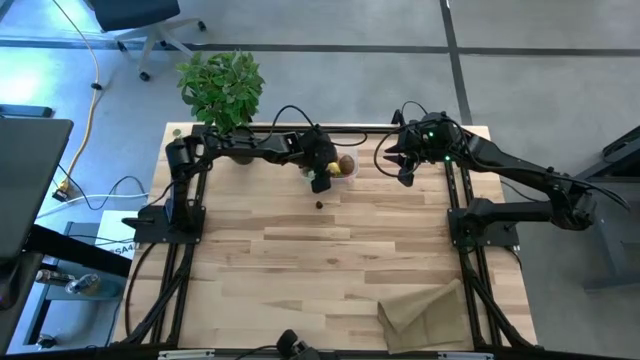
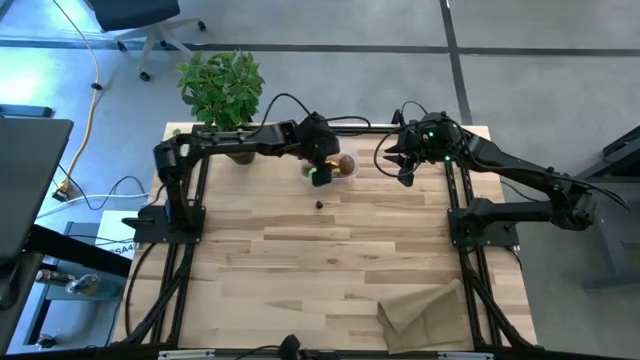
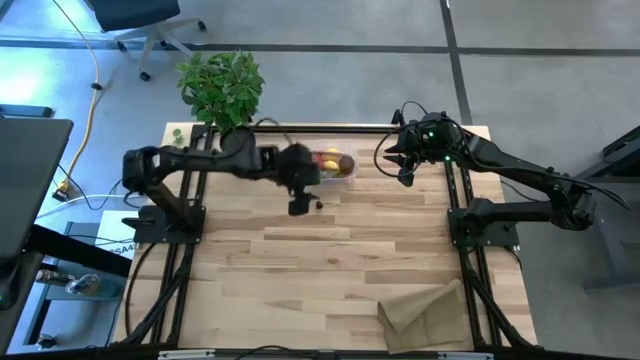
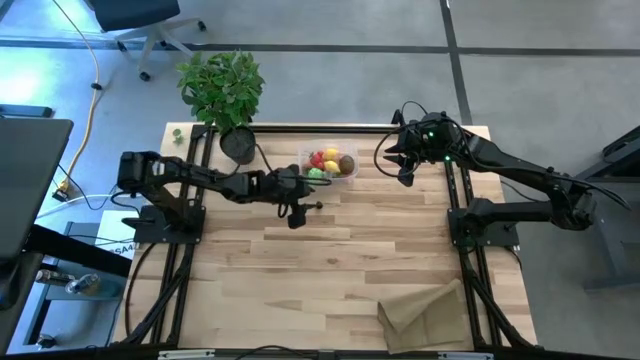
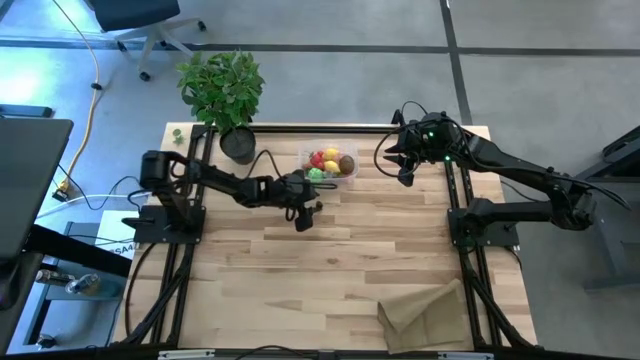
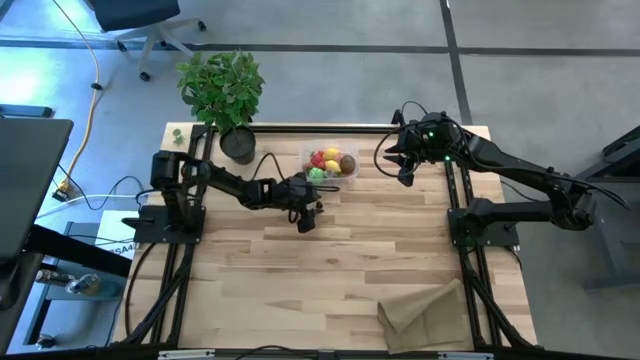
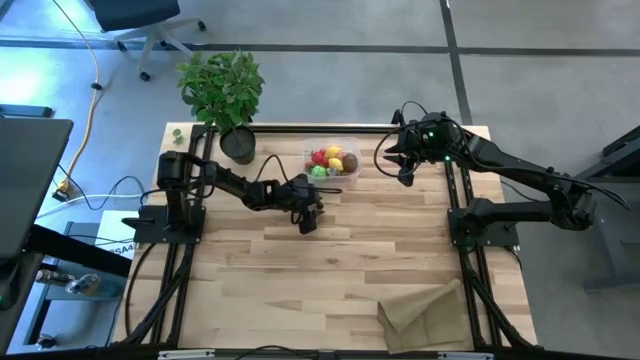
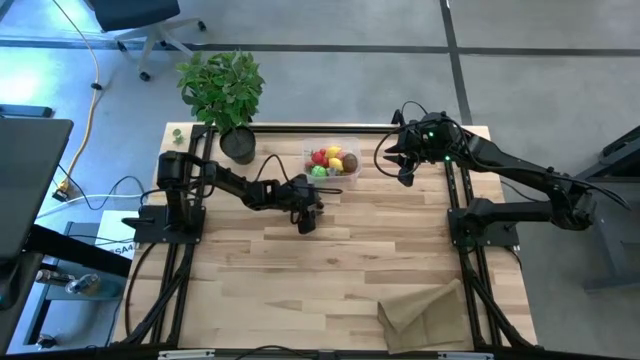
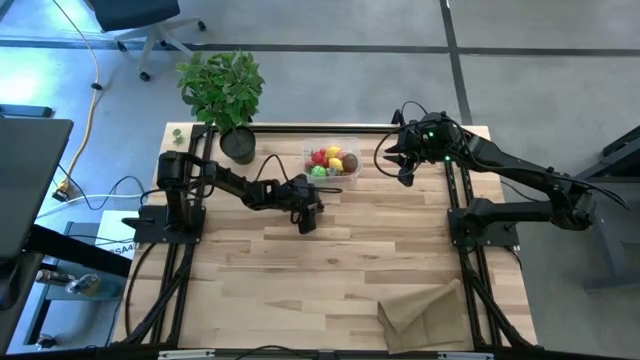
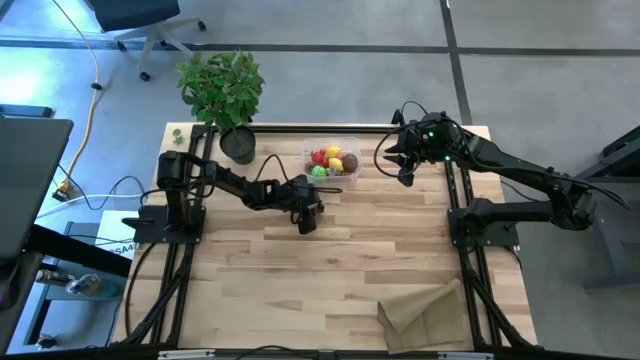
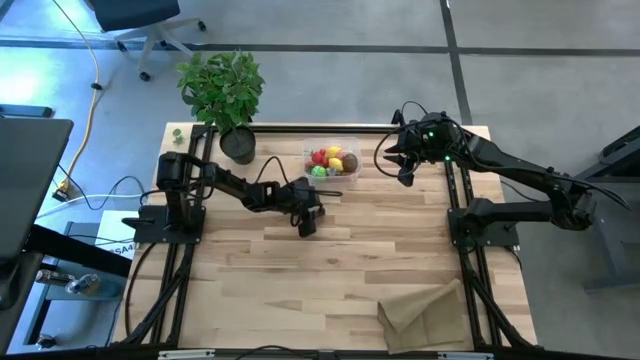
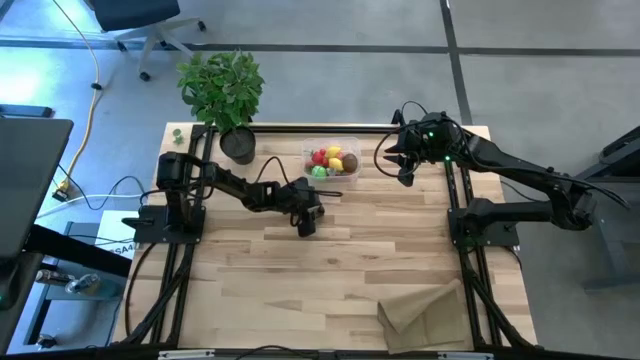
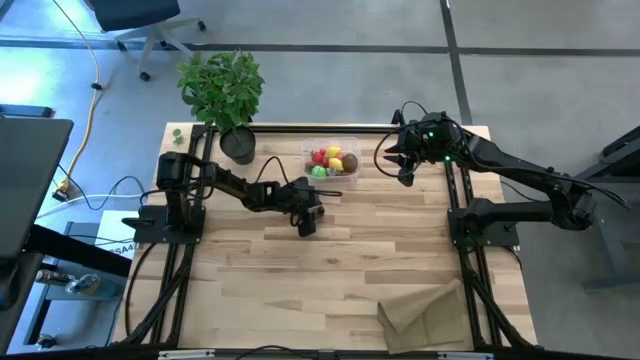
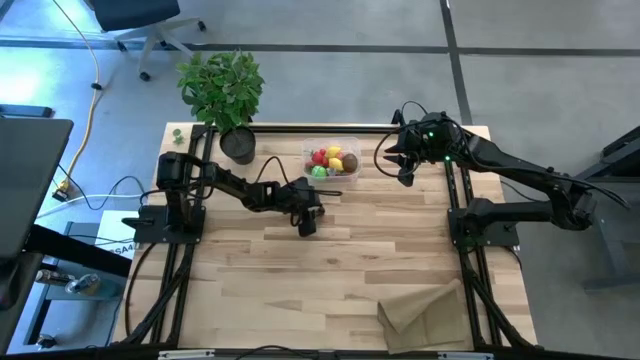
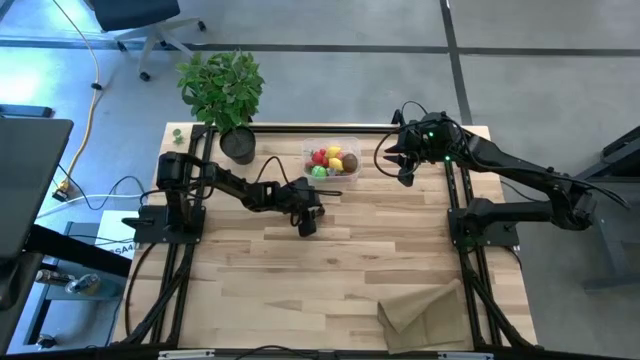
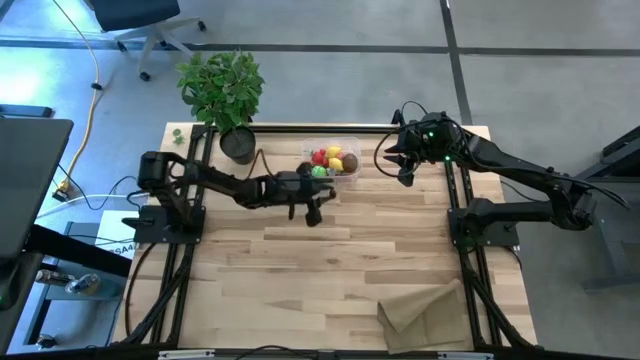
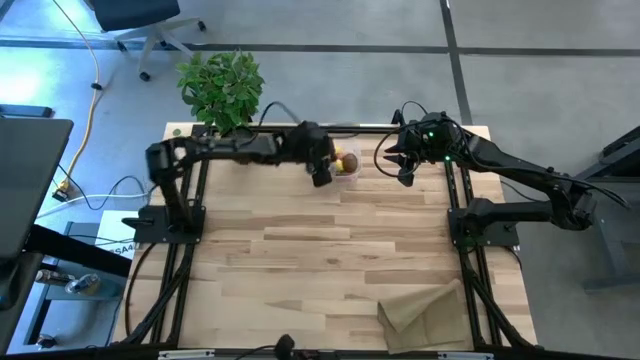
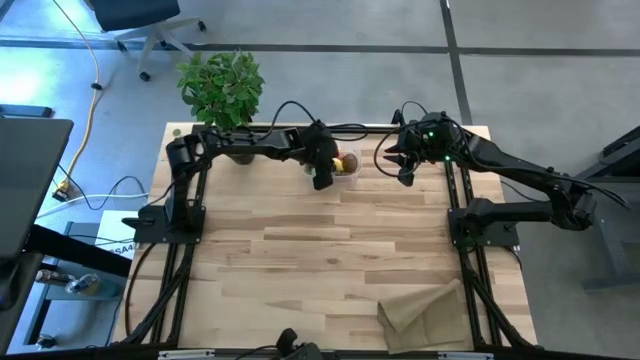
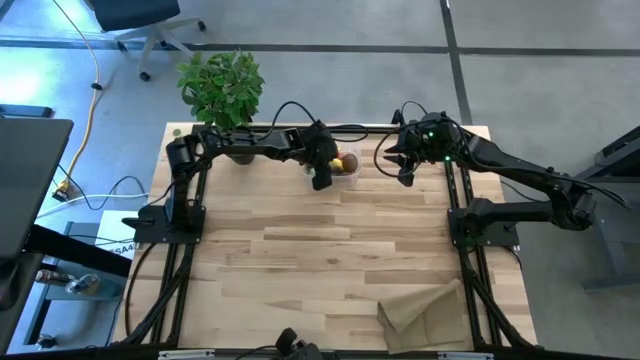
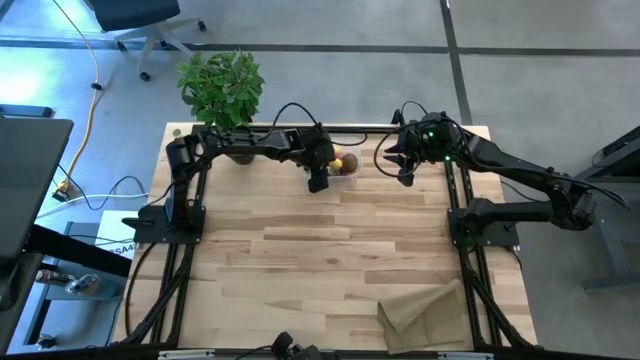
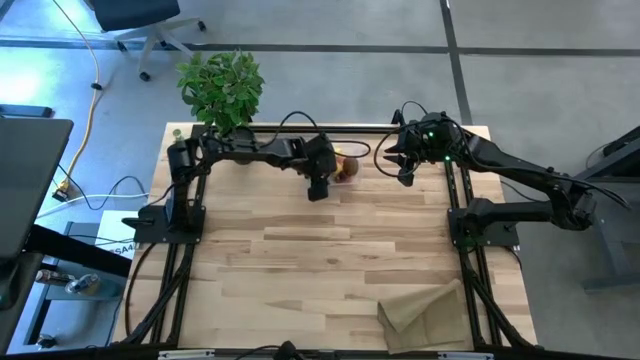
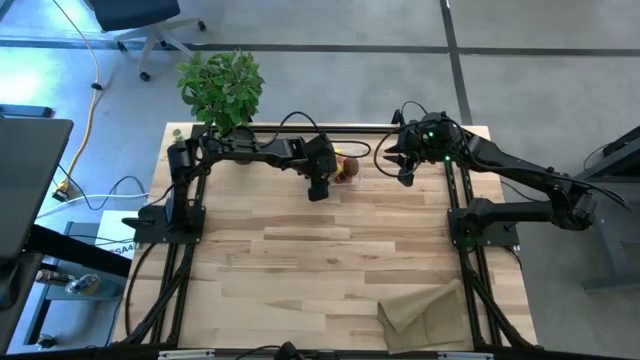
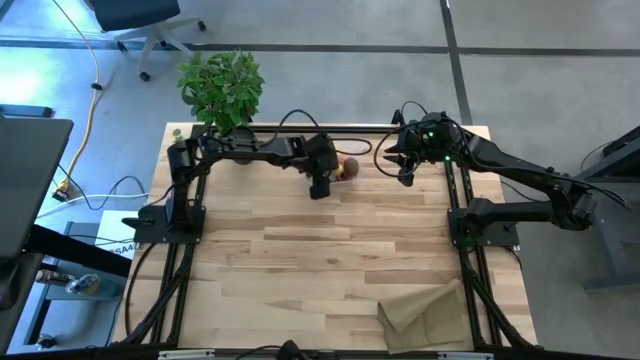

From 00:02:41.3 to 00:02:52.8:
Task: Pick and placing Produce into tupperware
Put the blackberry into the transparent bin

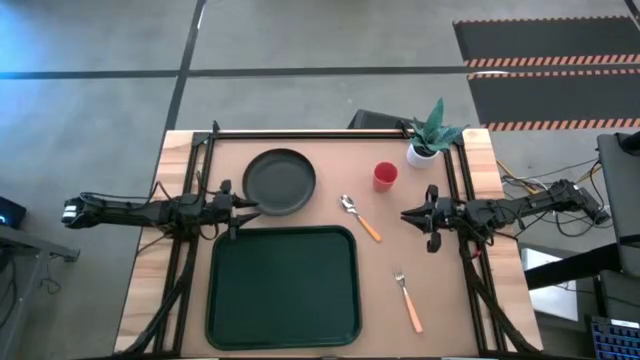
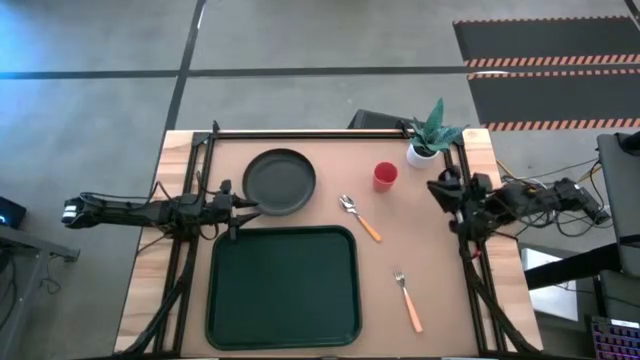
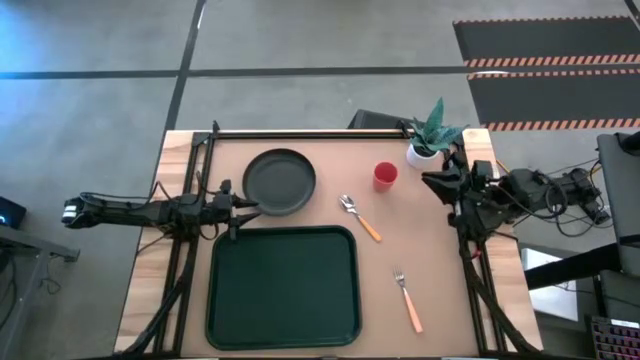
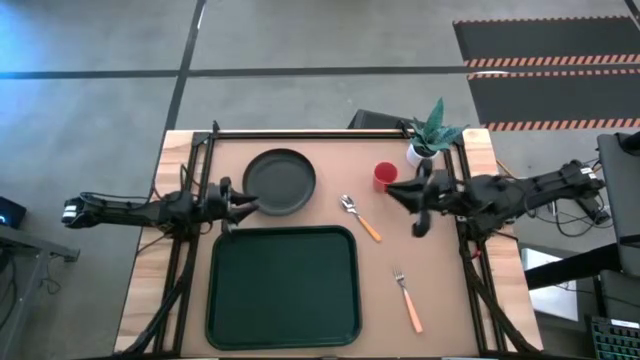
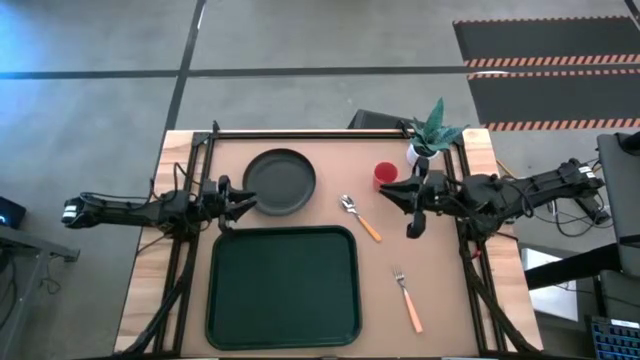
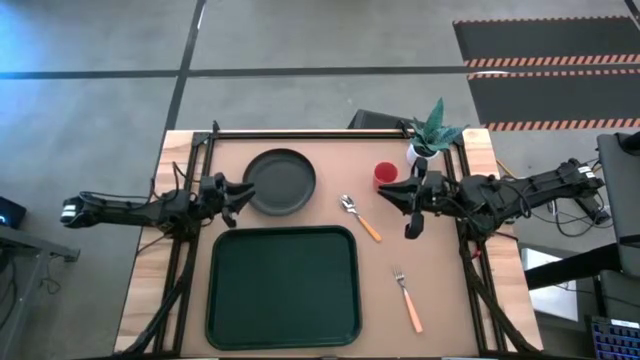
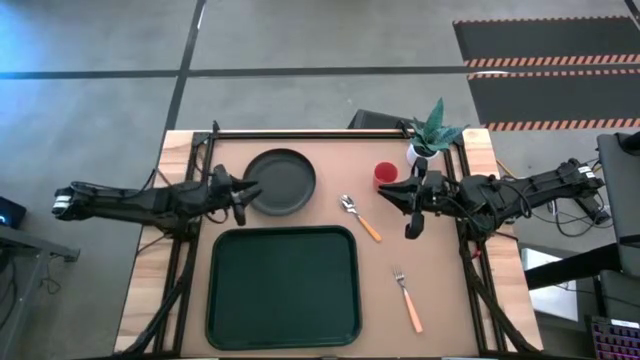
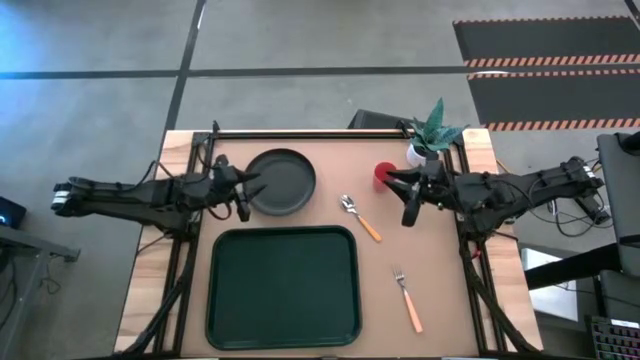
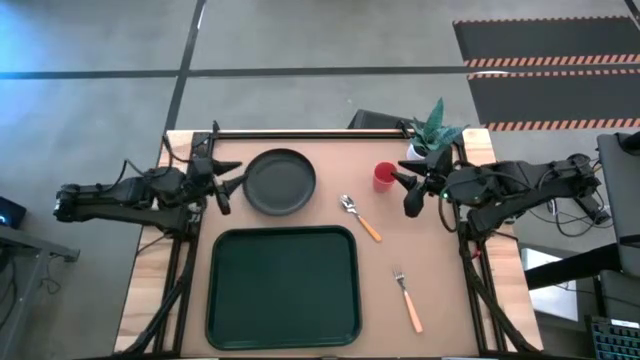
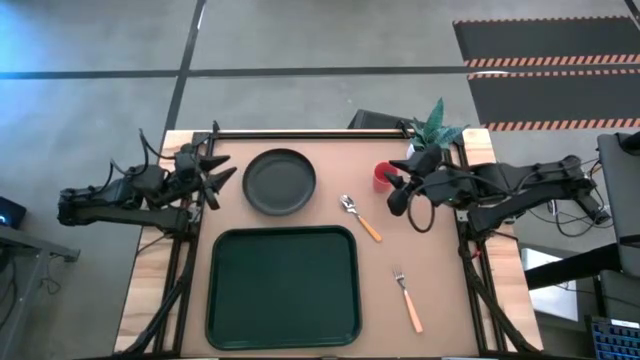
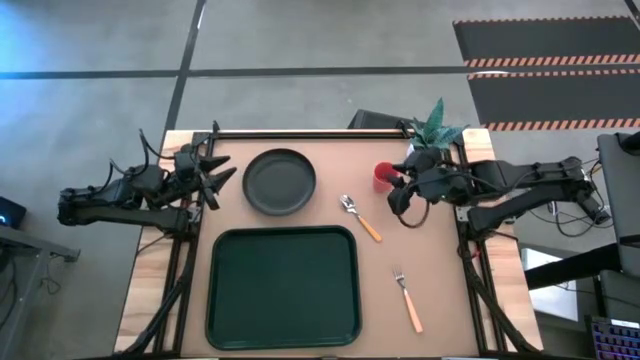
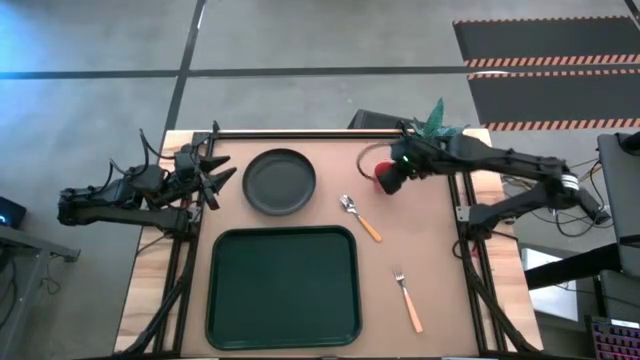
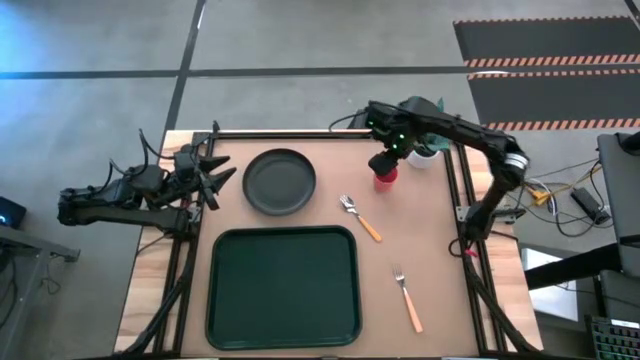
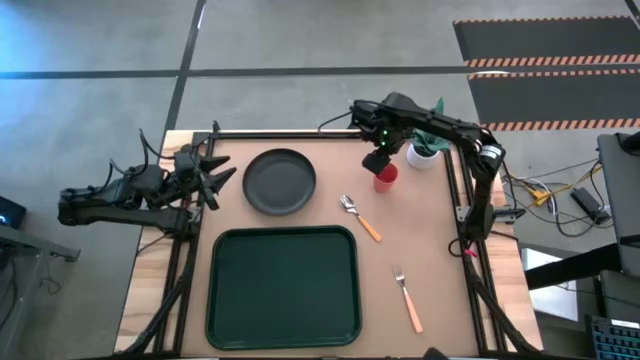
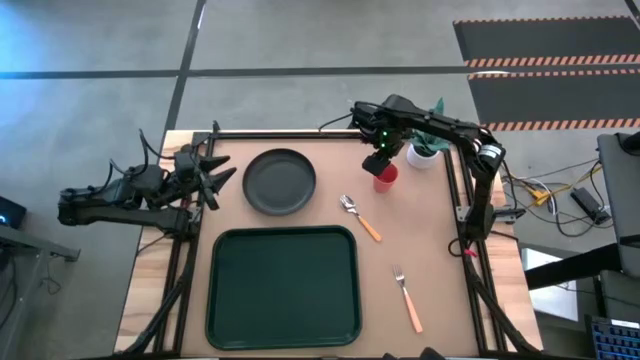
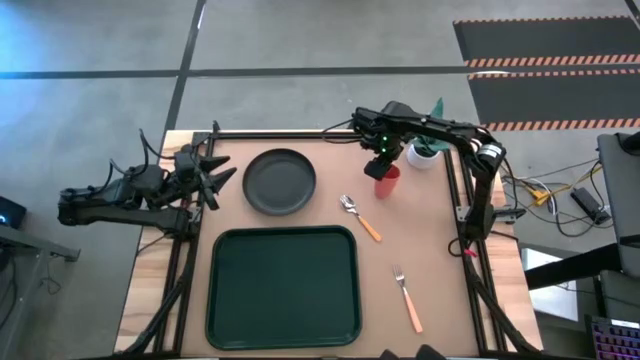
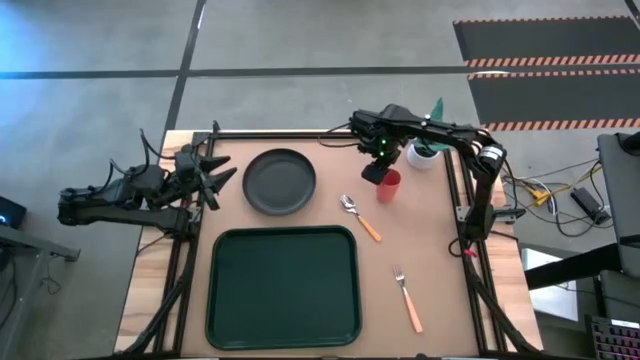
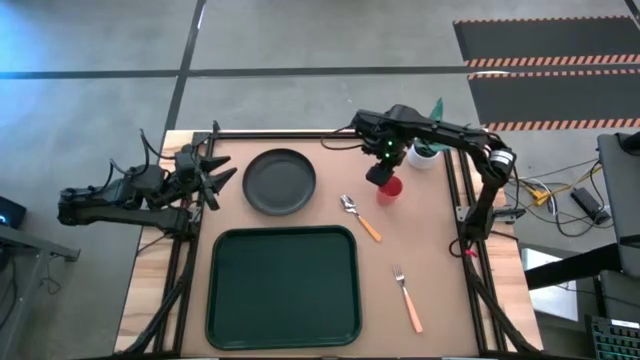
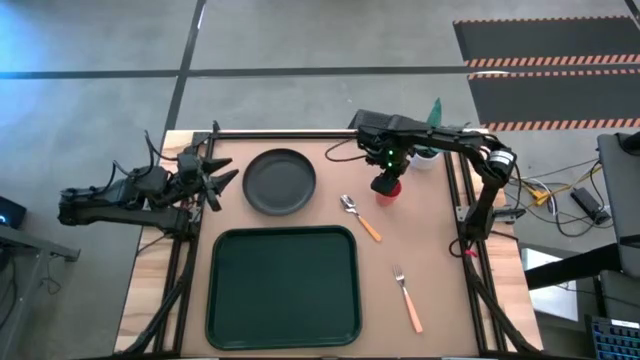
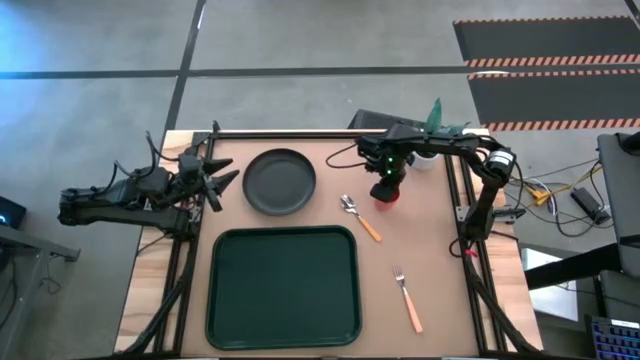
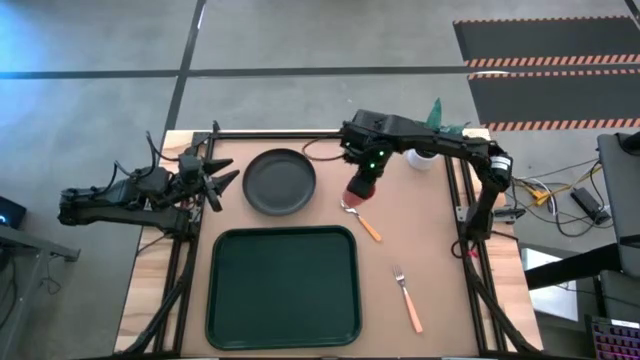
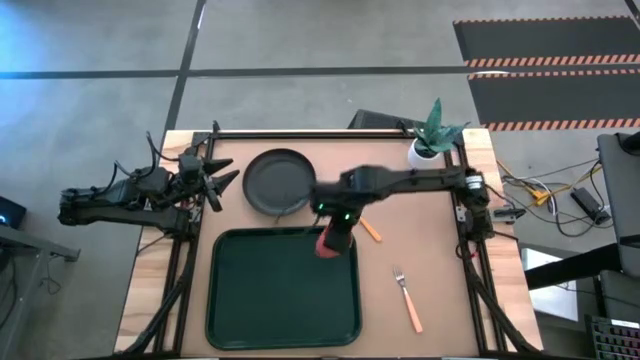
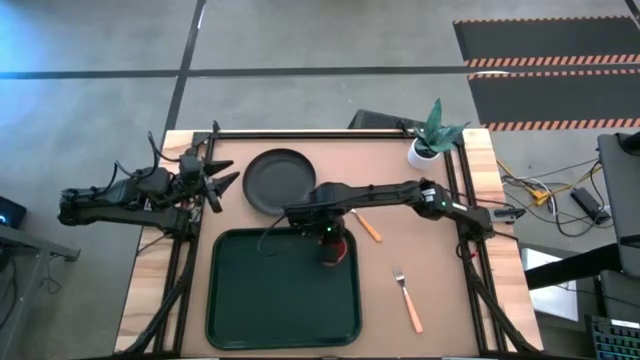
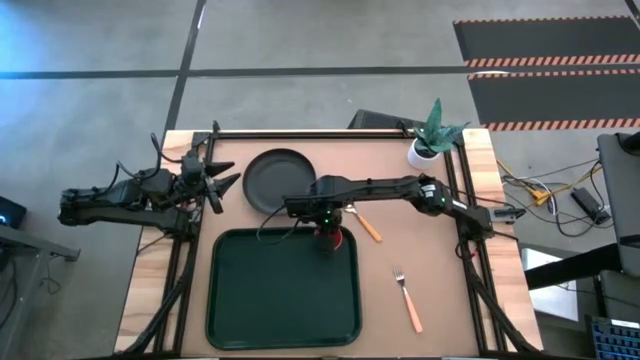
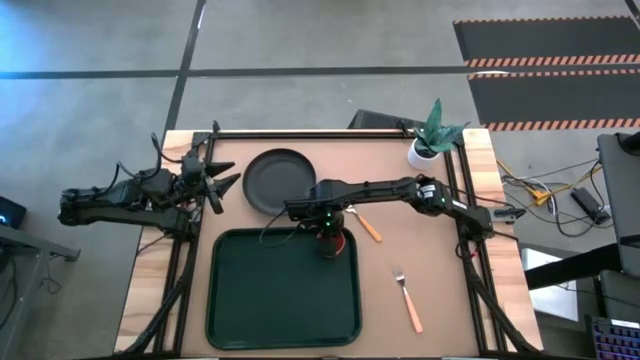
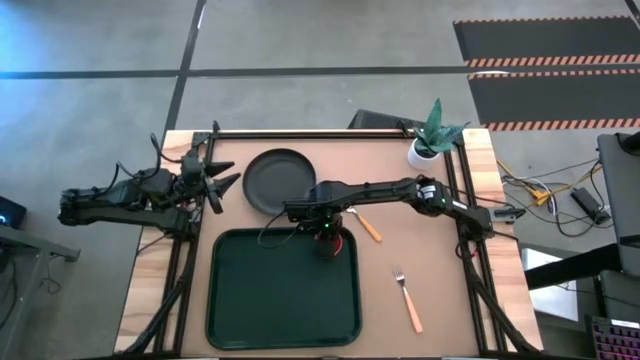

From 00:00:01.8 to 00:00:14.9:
Task: Pick and place plate/cup/fork/spoon on tray
Put the orange cup on the top right of the black tray
